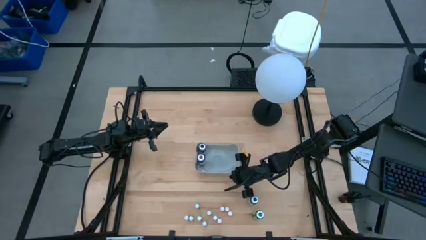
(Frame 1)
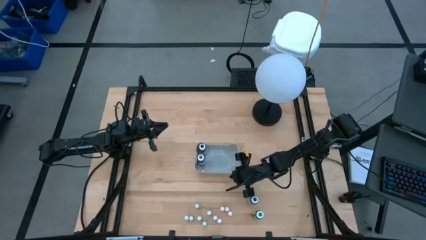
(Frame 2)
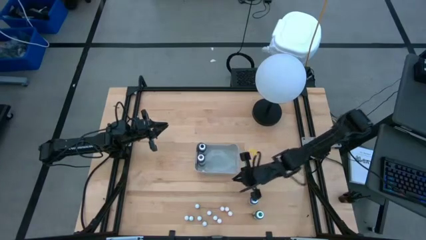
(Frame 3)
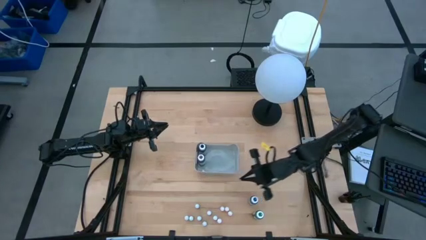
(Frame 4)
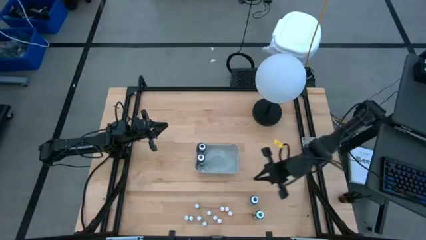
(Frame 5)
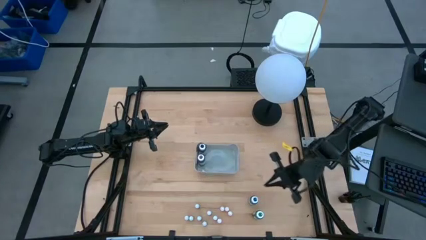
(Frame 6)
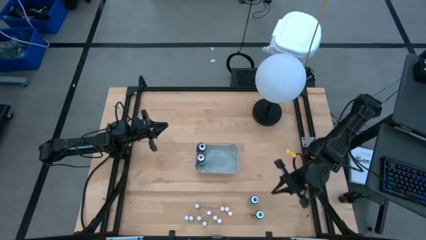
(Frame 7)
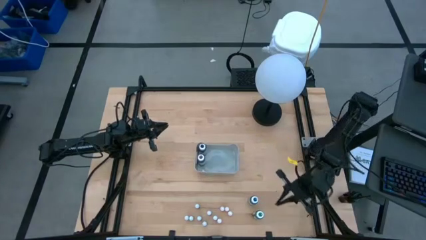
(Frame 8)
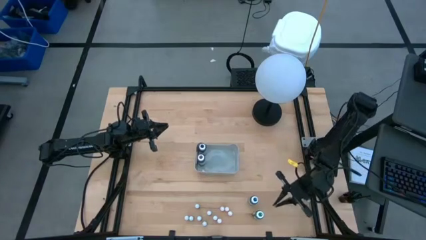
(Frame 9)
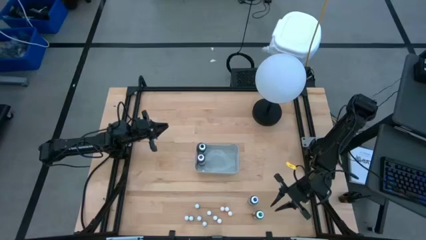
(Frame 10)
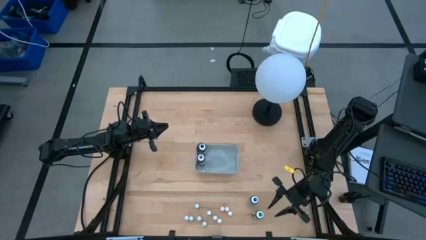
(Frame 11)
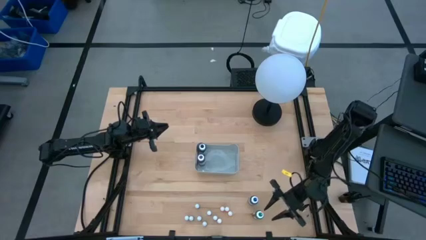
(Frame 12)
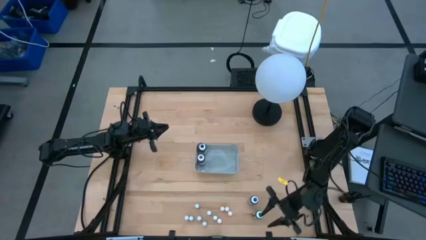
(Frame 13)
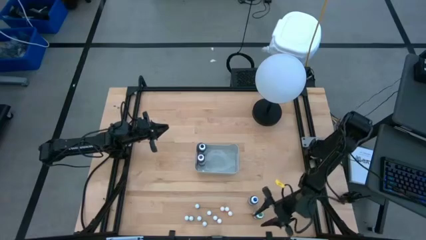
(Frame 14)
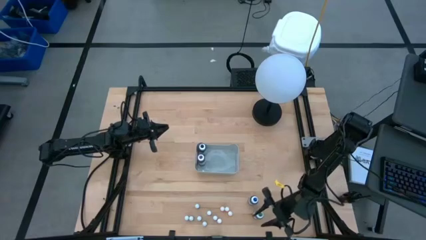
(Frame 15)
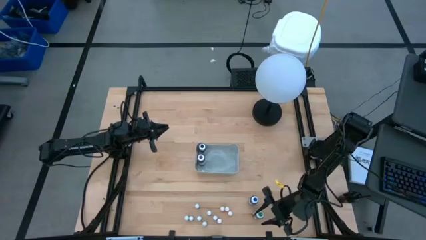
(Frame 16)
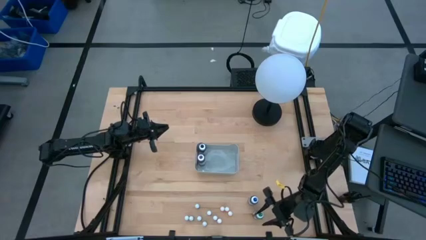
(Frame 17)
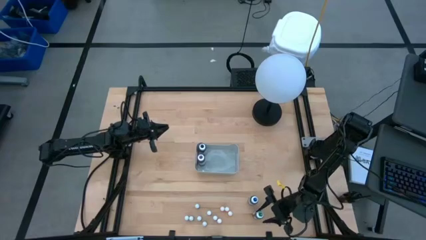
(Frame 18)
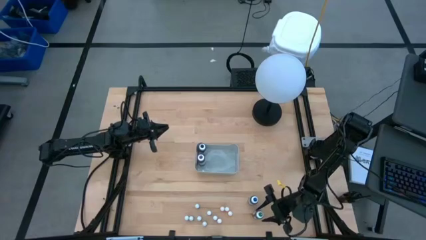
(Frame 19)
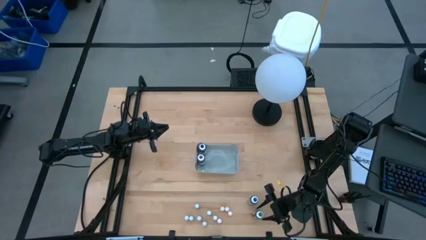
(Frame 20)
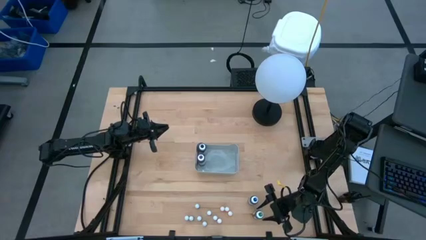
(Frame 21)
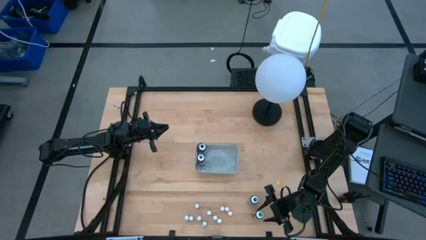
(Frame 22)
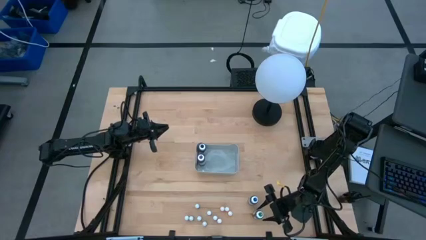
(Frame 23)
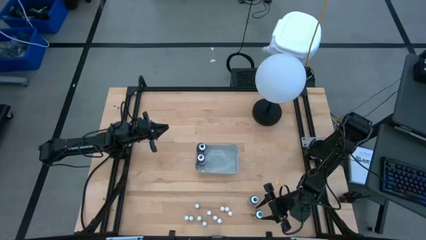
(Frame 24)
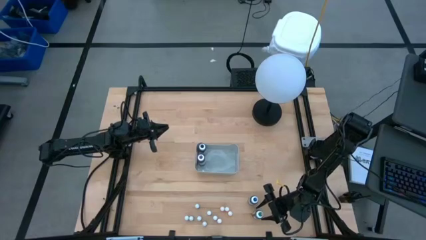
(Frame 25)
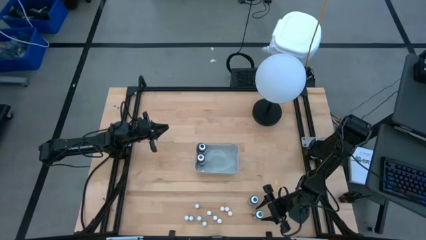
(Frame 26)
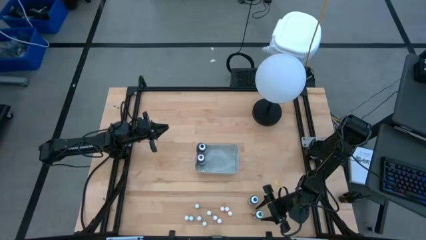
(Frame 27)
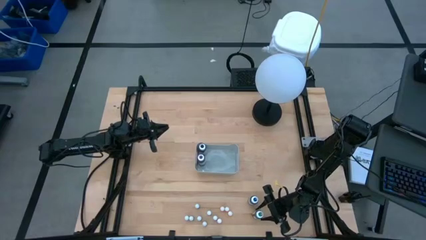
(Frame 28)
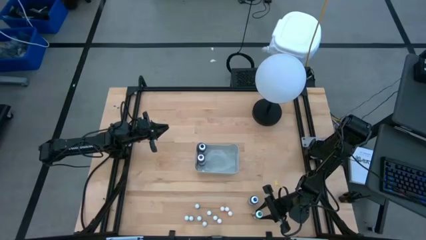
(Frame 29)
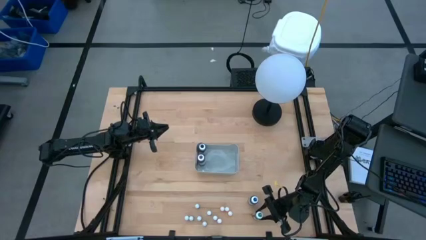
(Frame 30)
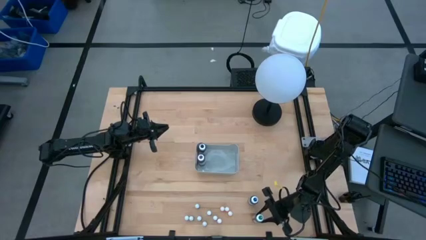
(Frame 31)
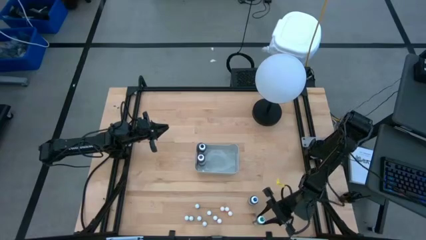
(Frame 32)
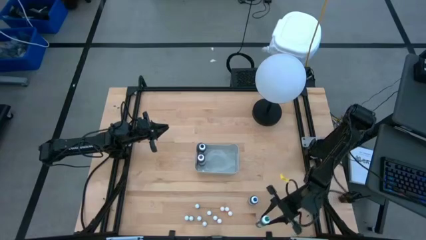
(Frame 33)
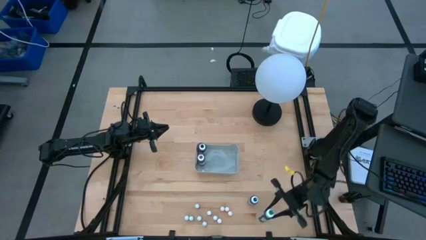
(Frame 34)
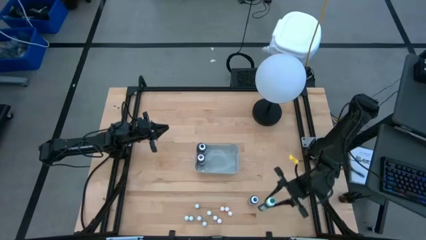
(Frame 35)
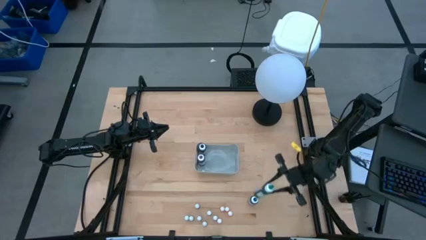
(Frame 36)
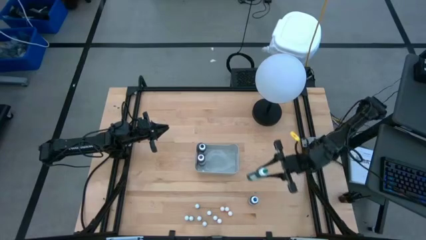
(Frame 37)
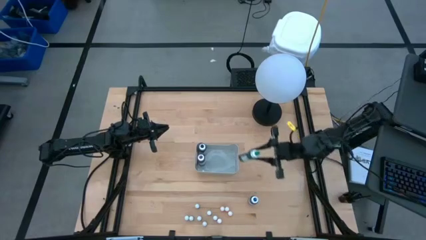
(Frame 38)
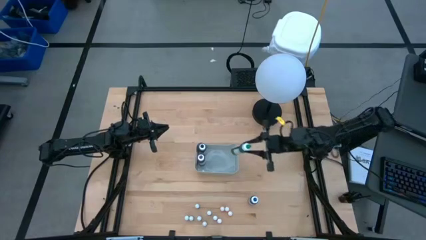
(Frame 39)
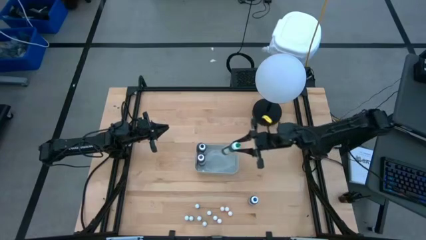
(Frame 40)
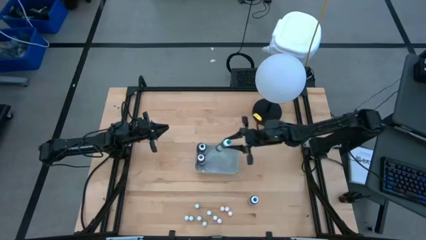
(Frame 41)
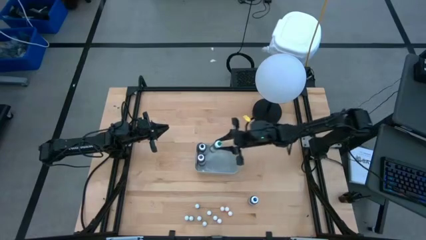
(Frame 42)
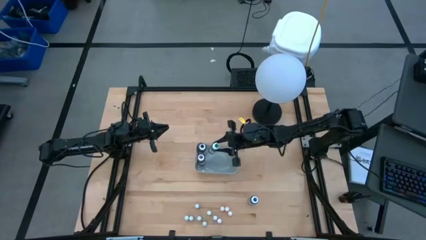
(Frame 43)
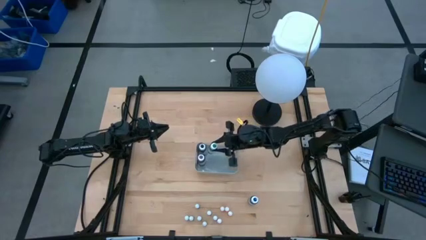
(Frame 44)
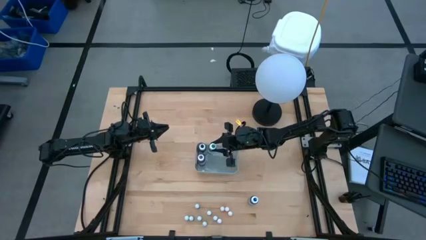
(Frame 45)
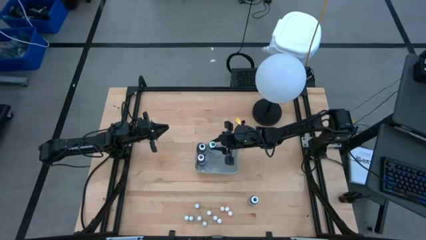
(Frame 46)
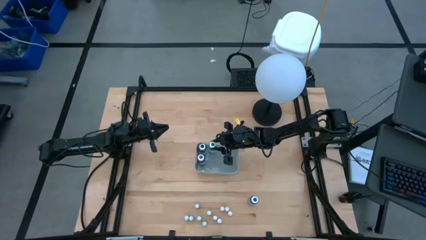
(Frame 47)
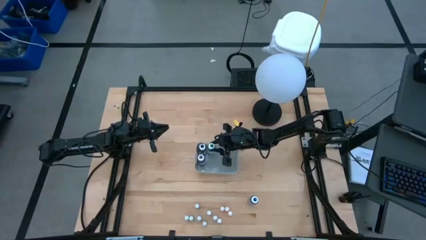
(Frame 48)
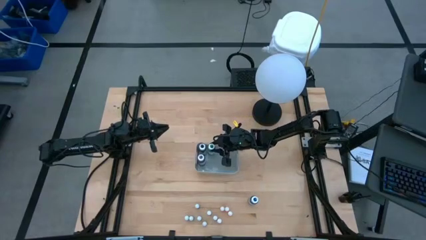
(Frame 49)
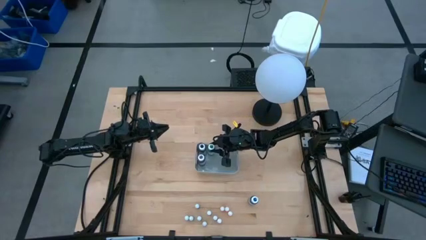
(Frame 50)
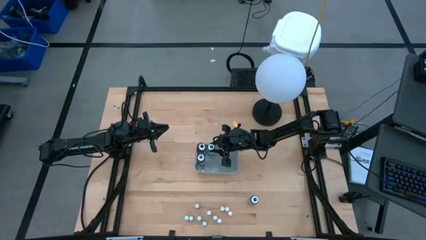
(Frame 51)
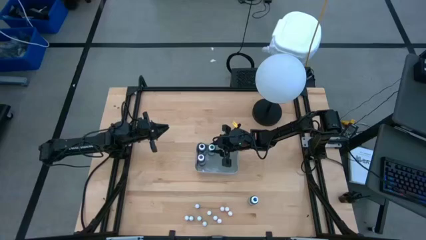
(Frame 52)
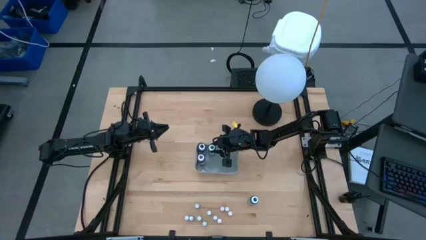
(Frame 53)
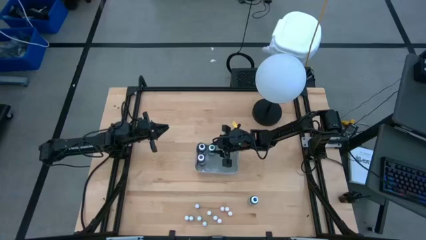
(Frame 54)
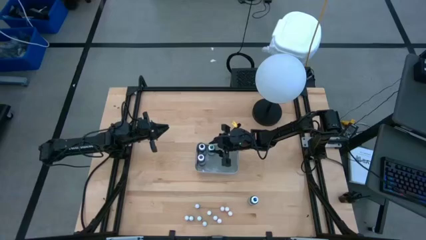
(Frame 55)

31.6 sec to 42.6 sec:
Task: Pick & Place food coloring
Put the large green food coloring bottle into the gray bin
